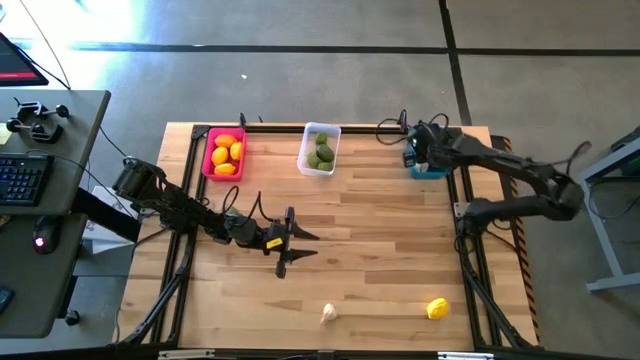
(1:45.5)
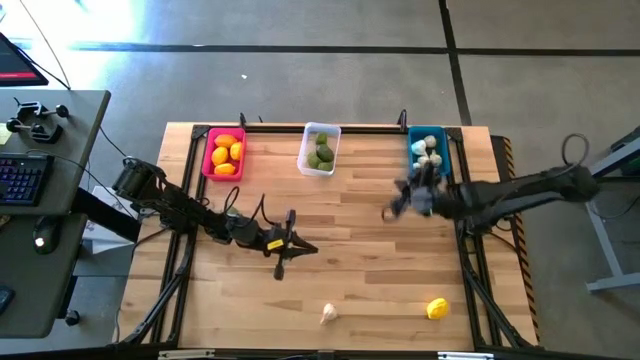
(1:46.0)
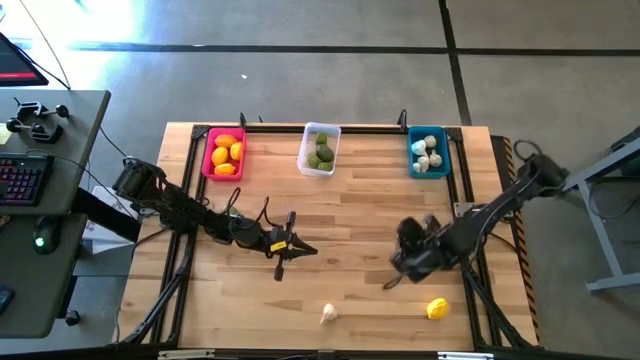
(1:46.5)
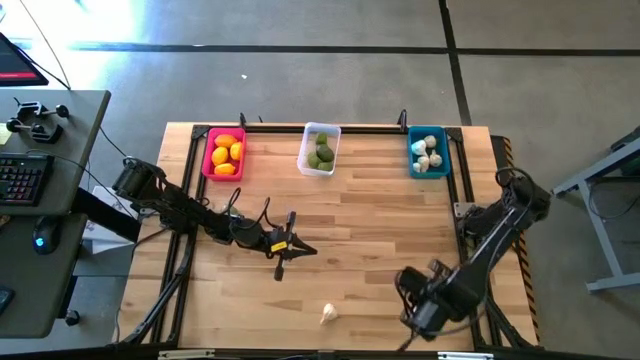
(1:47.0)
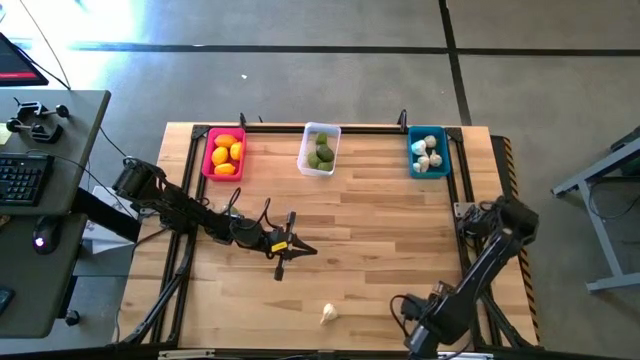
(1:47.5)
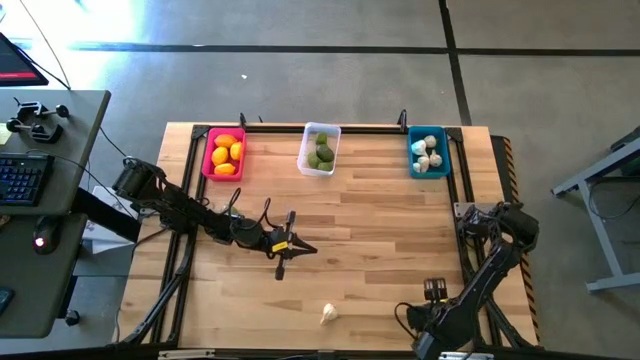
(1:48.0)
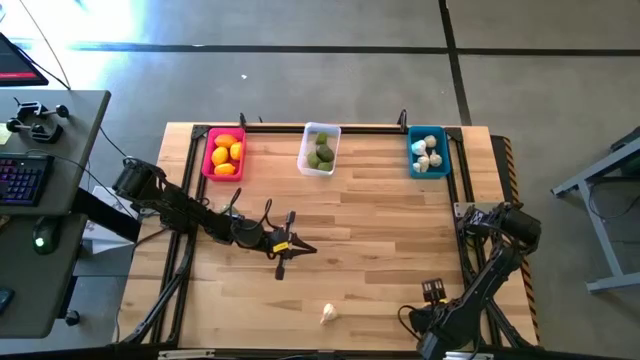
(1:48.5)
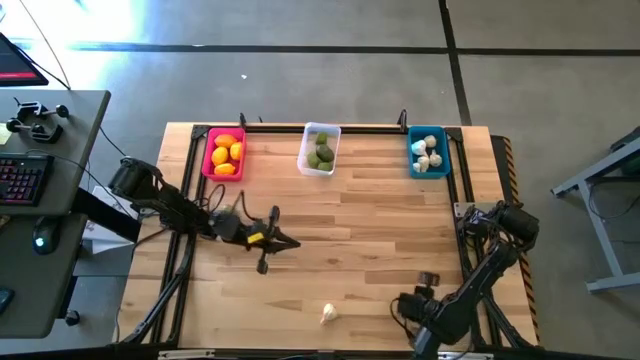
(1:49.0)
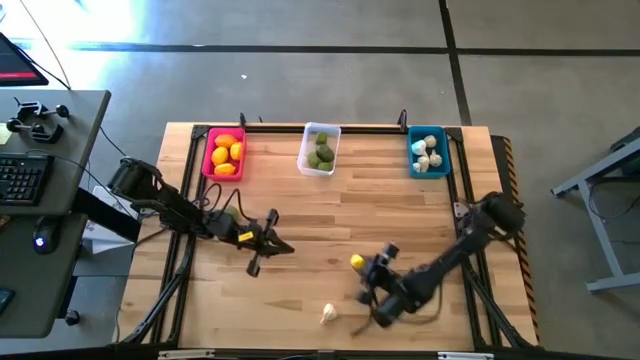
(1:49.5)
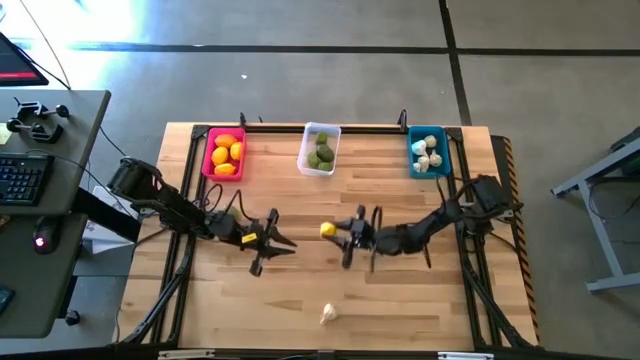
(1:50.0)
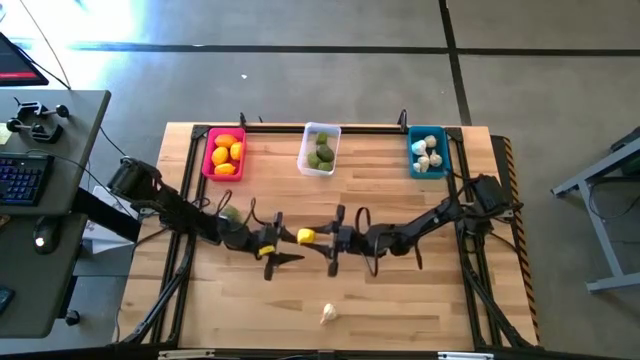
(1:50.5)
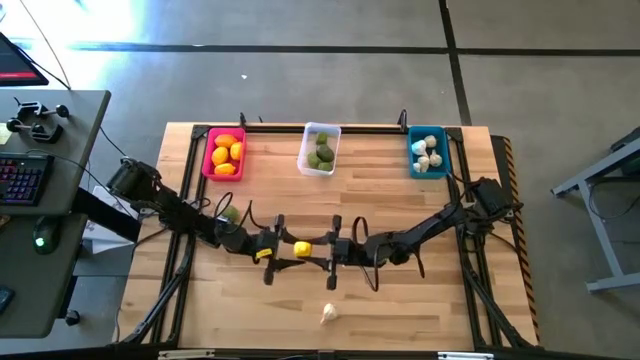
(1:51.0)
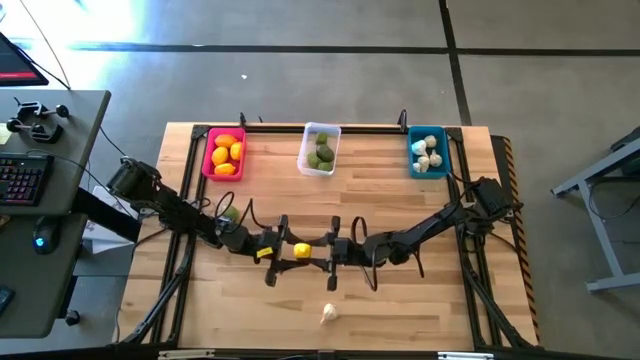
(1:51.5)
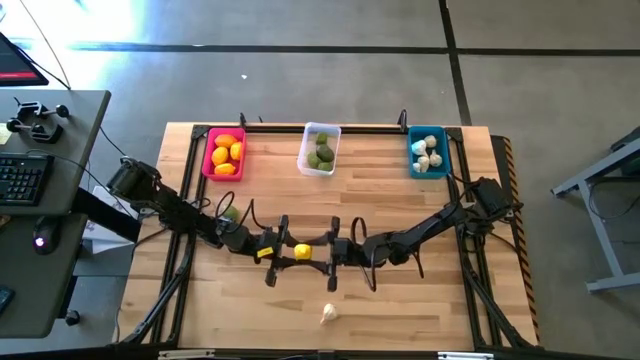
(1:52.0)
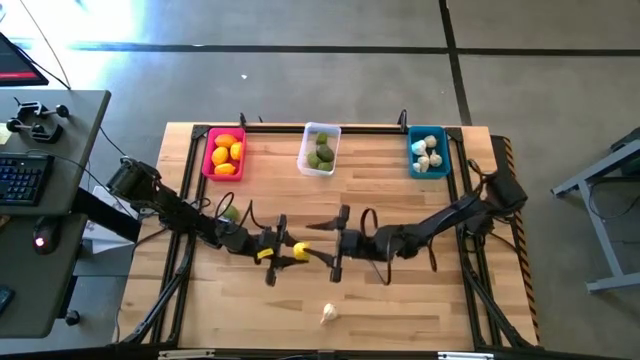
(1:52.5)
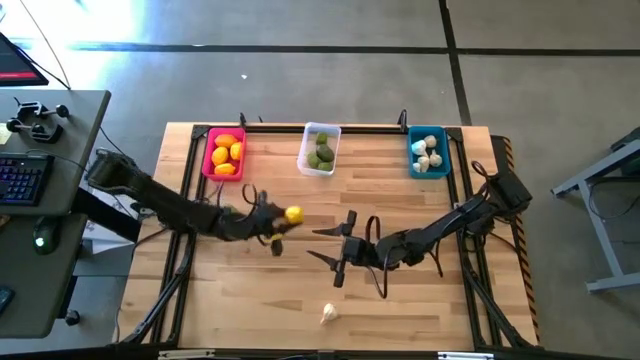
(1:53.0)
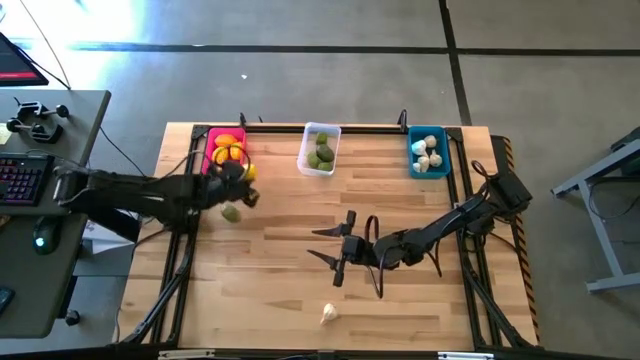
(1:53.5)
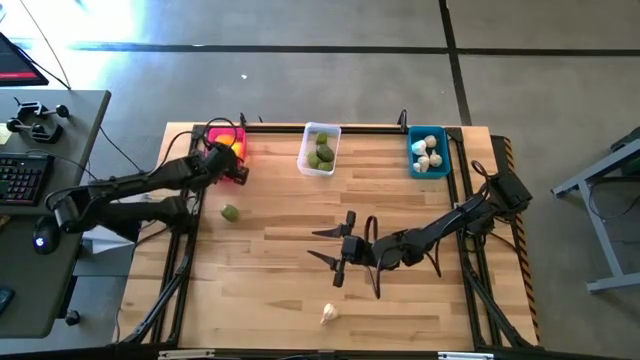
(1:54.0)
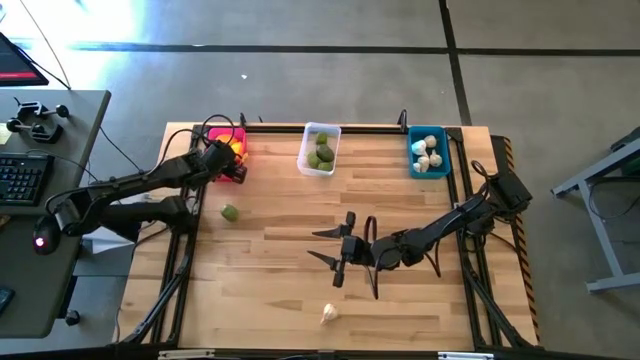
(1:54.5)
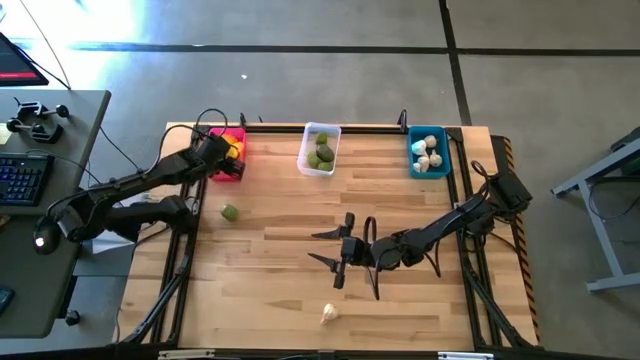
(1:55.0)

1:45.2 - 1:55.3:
Task: Sort produce into baskets
Put the lemon into the pink bin

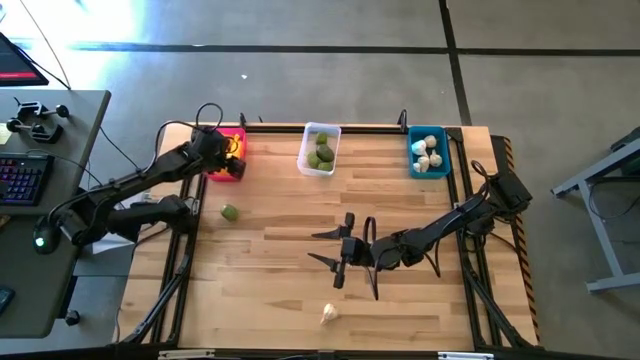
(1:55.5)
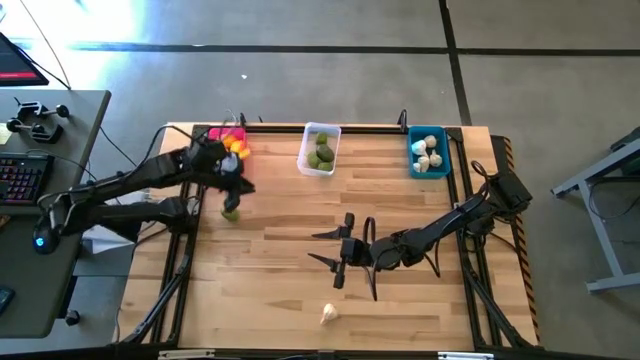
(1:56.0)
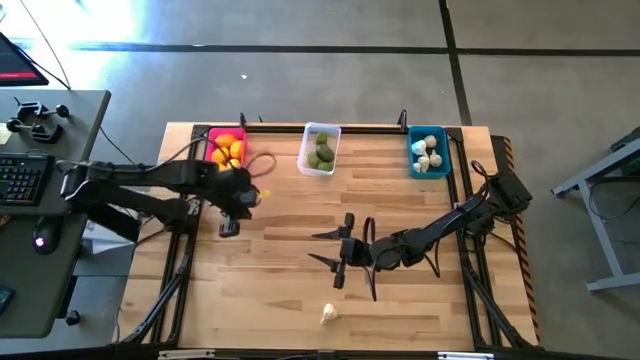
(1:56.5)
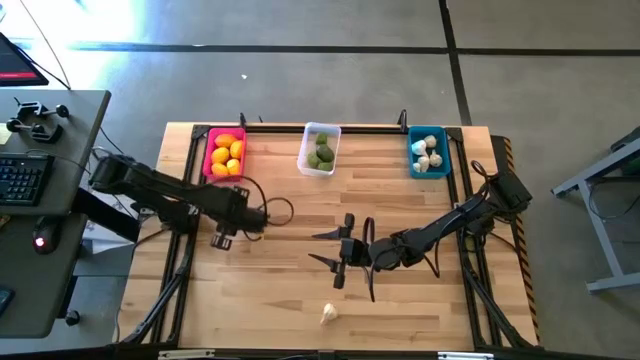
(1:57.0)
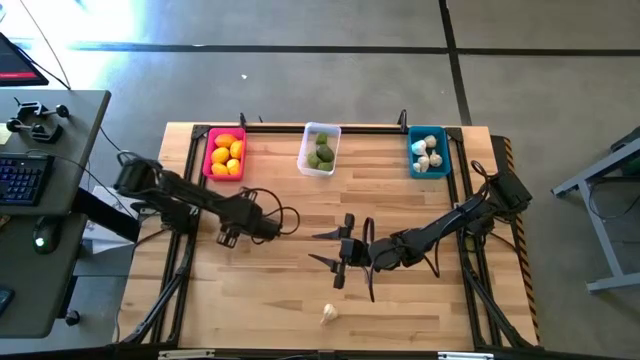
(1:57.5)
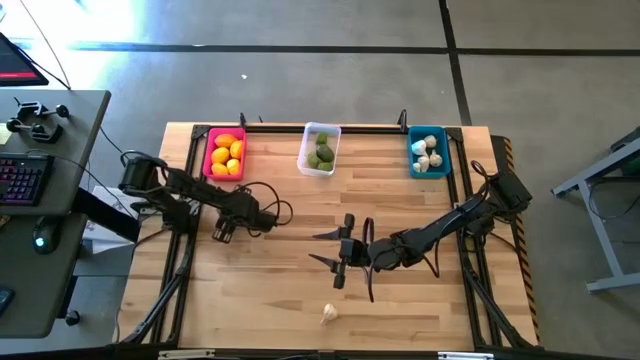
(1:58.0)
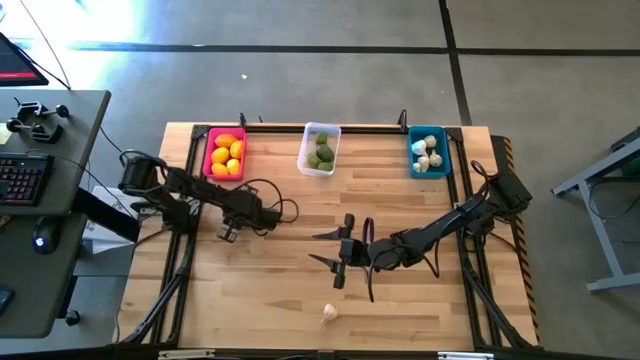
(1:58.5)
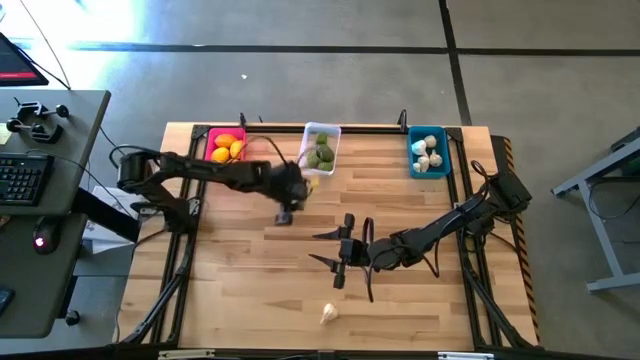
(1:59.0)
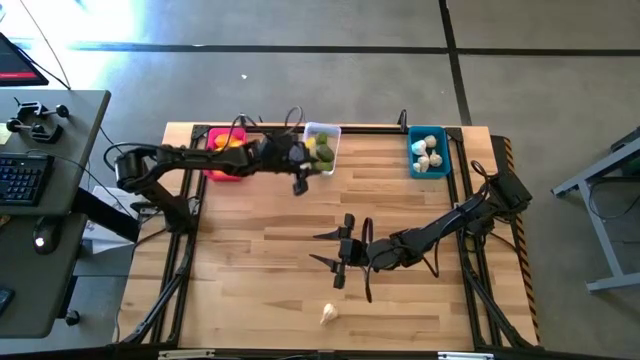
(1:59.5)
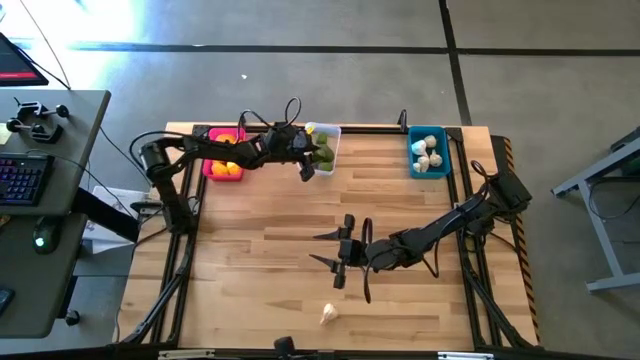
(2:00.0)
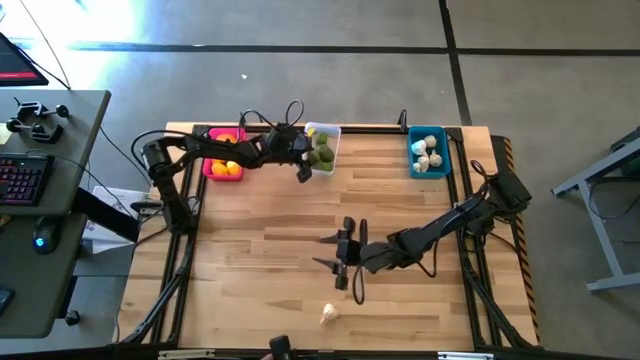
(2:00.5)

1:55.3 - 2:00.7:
Put the lime into the white bin

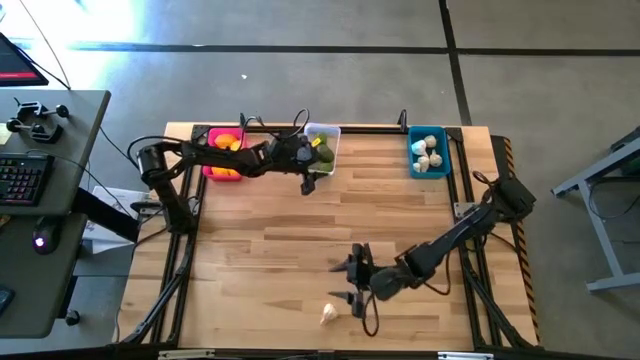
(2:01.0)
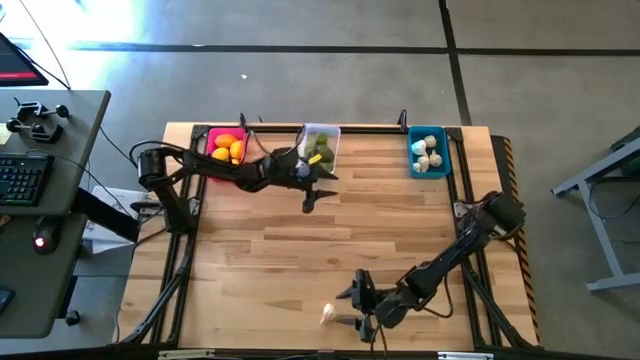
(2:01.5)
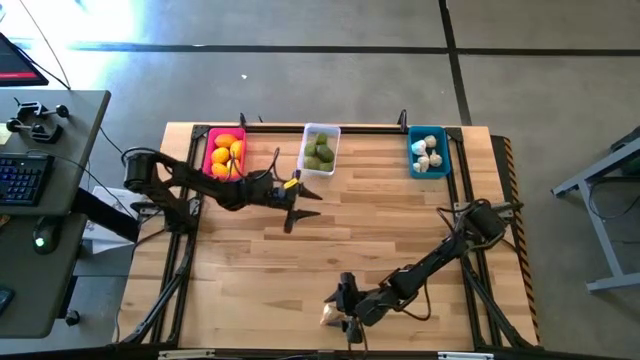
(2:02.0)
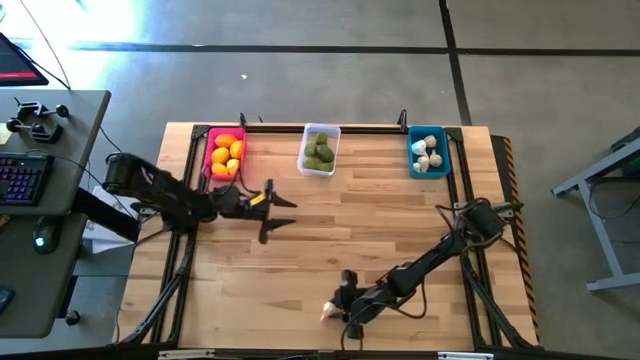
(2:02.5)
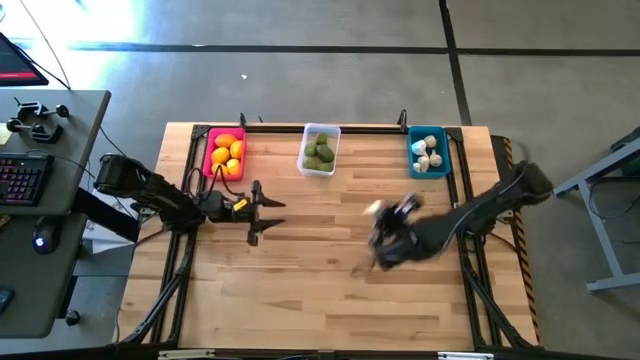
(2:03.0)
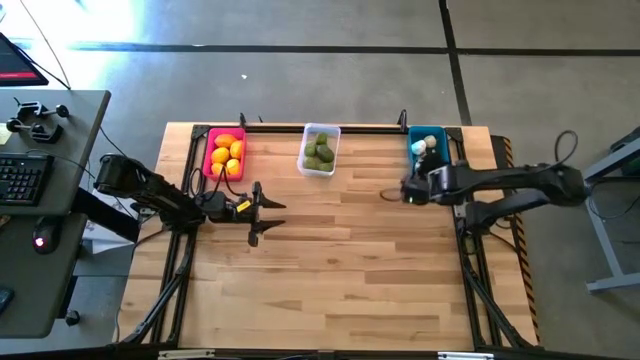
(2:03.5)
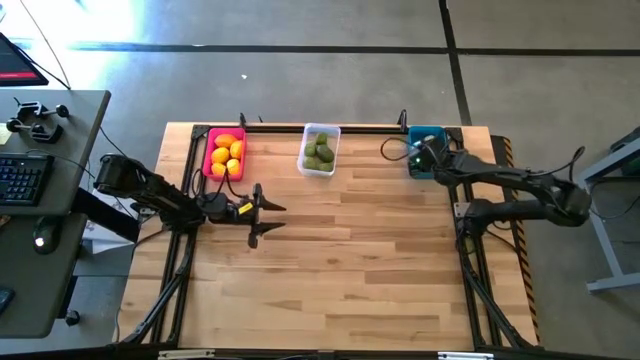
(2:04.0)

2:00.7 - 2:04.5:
Put the garlic into the blue bin

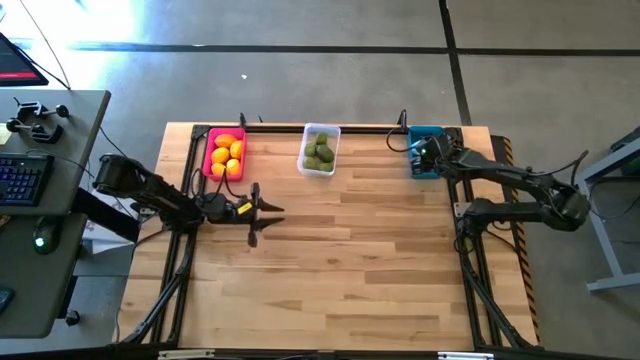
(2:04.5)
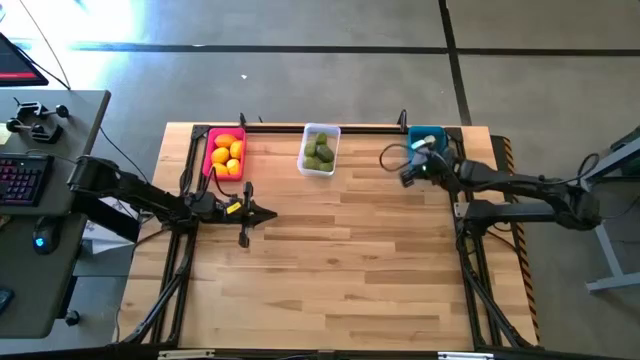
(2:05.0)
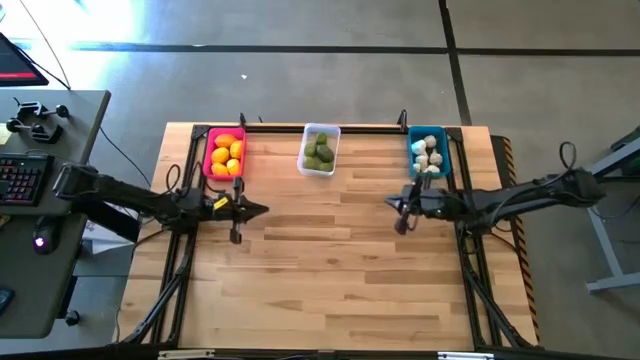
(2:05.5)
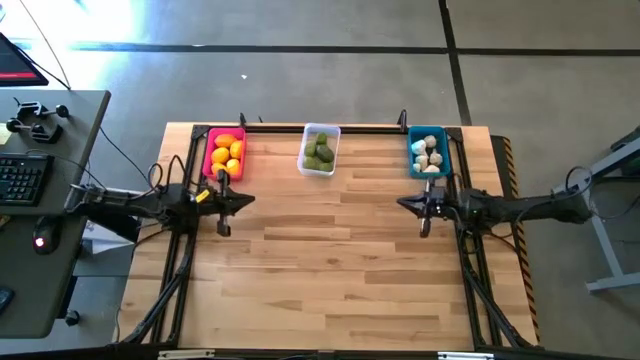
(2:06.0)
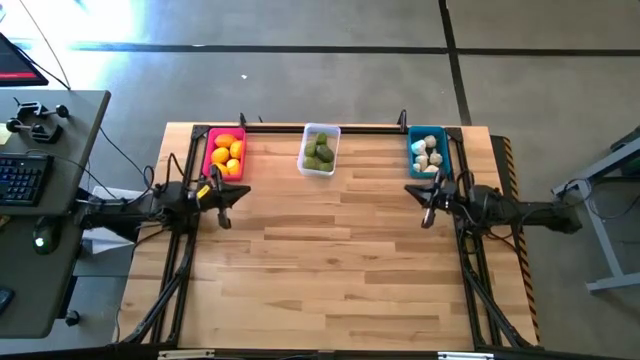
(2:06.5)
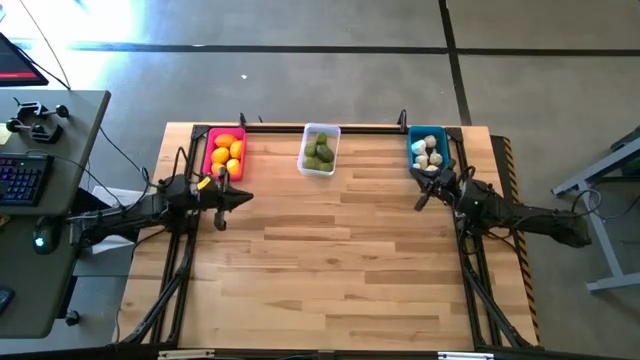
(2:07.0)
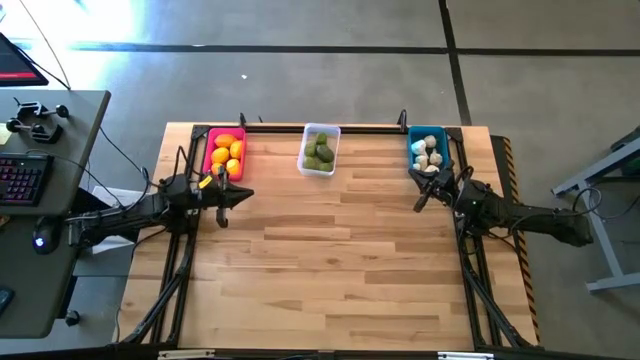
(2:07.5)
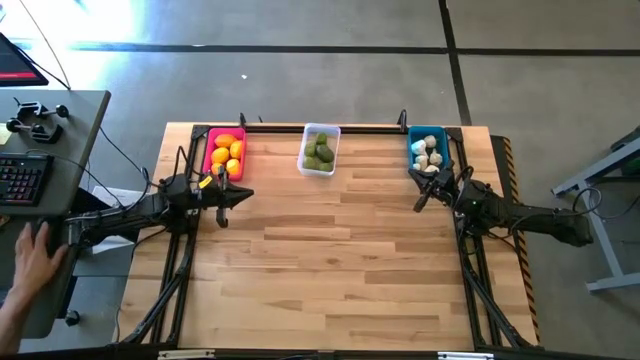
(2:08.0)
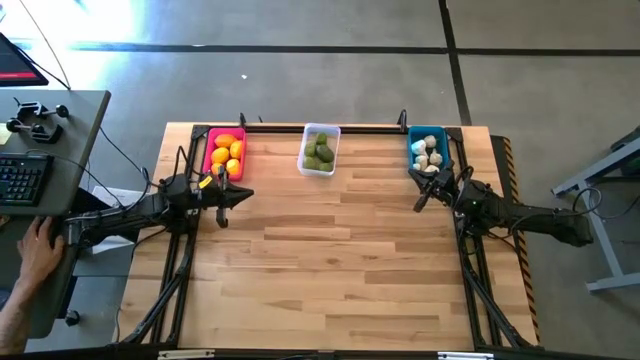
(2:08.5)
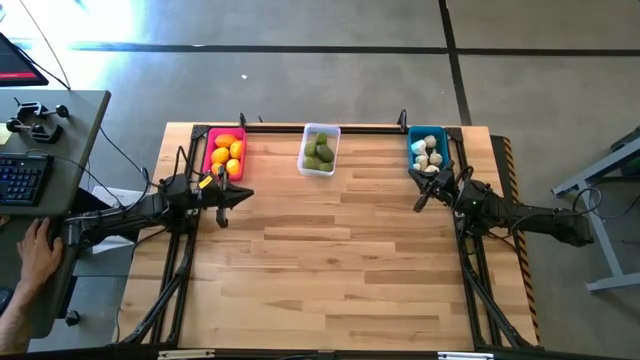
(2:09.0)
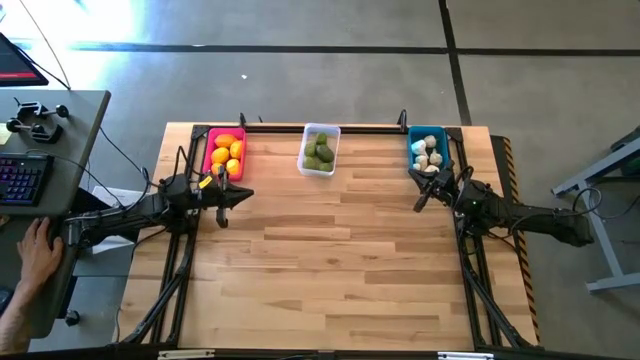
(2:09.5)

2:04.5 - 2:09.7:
Return to Home Position
